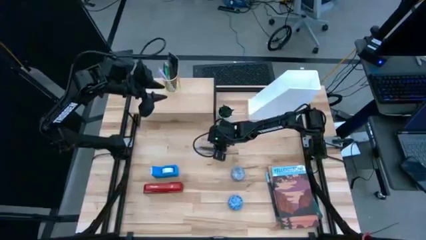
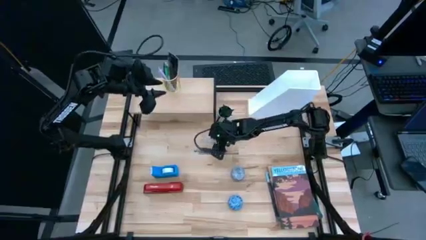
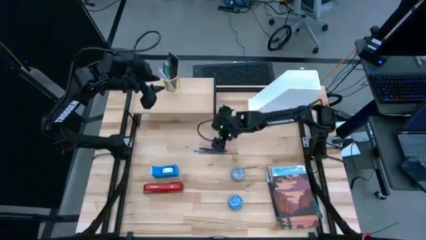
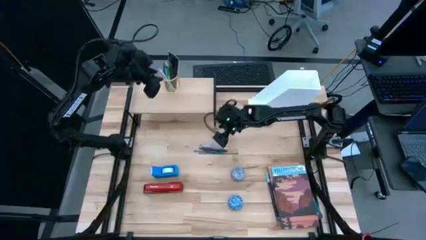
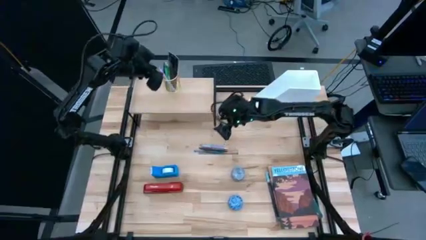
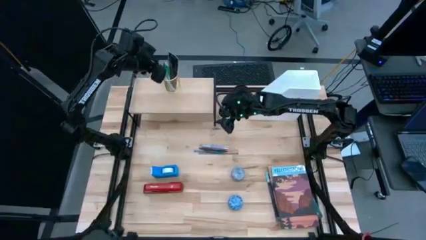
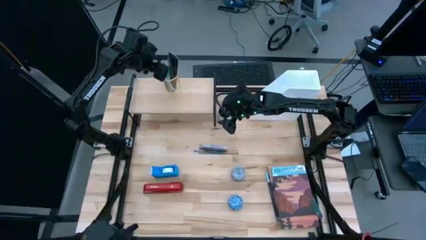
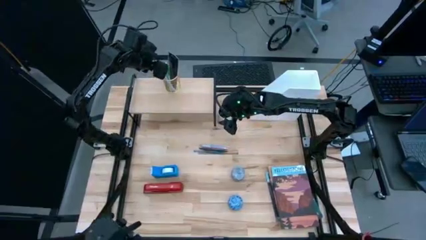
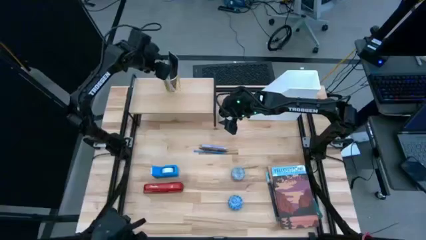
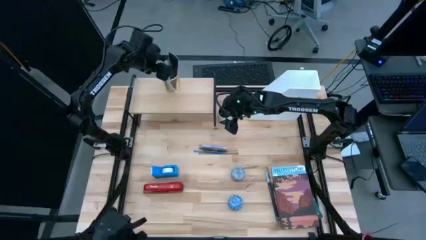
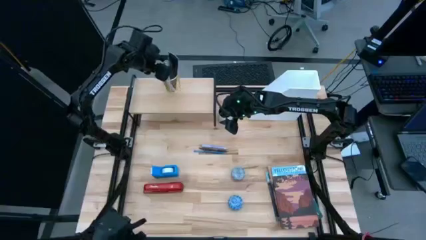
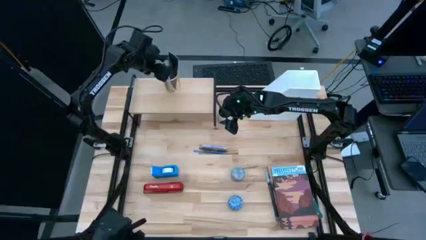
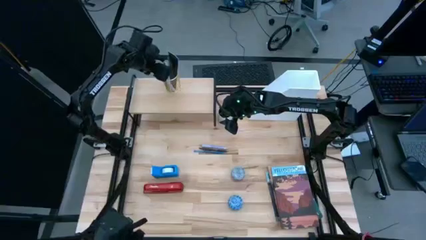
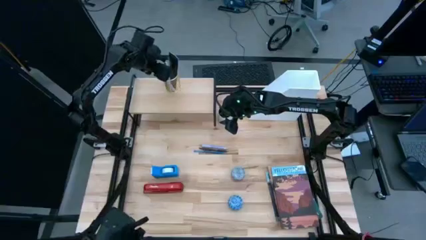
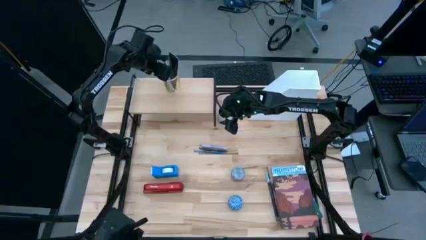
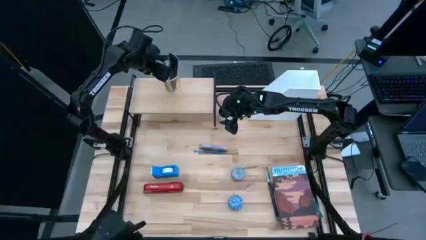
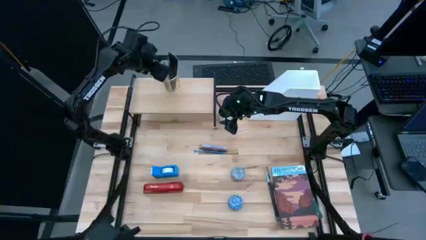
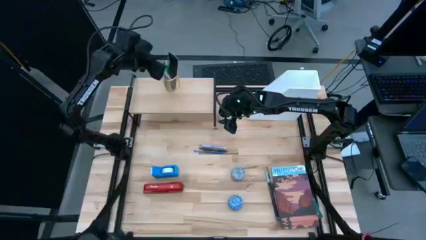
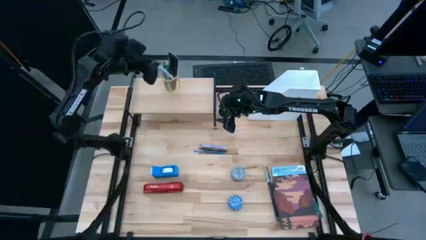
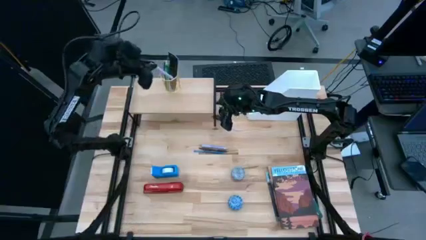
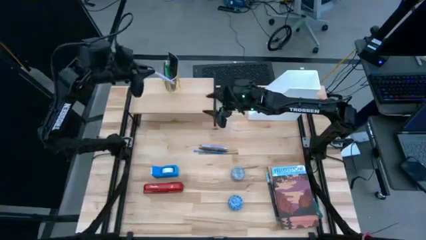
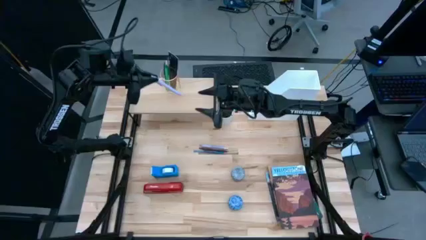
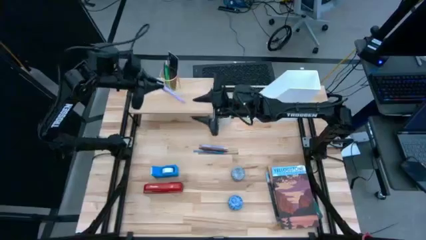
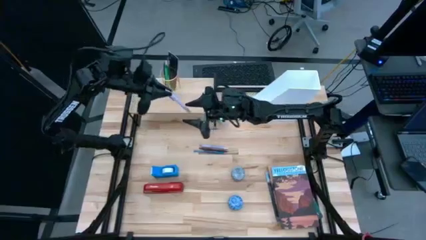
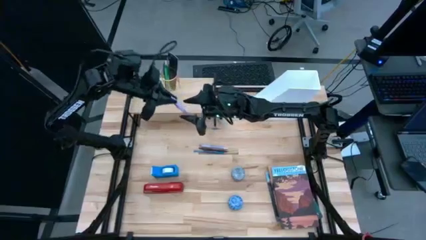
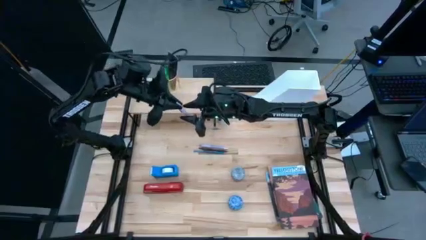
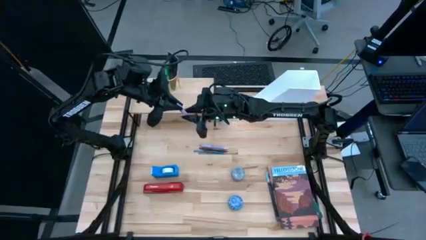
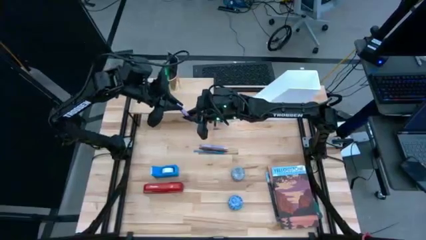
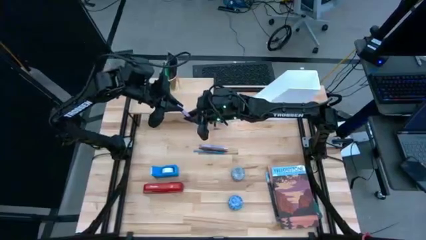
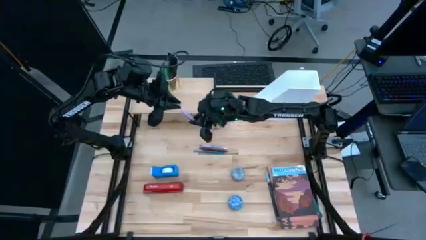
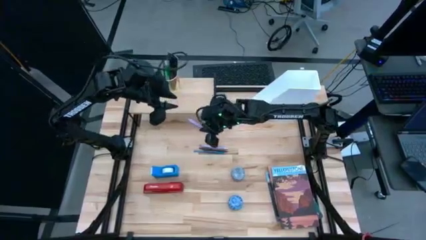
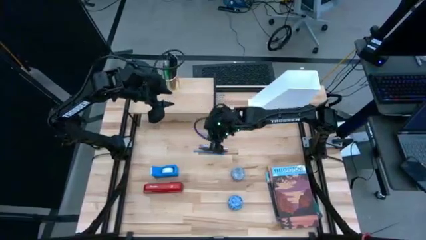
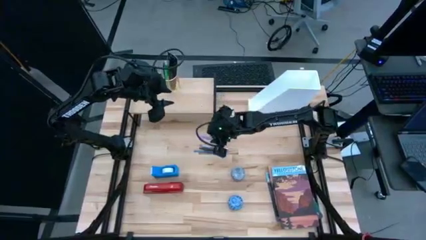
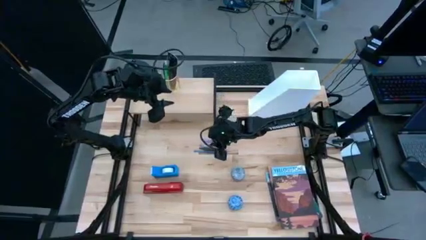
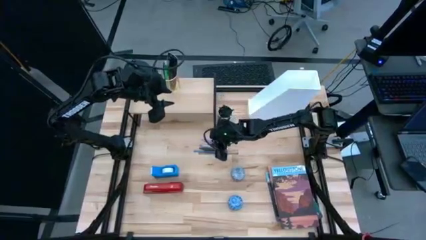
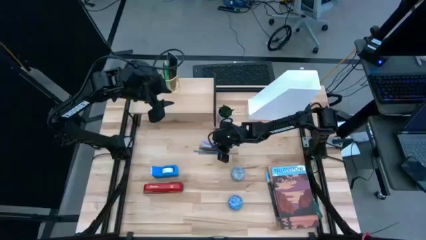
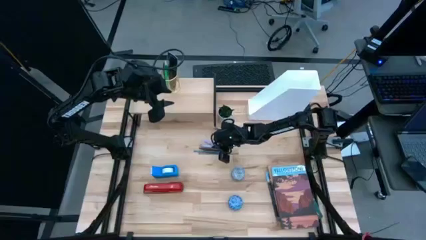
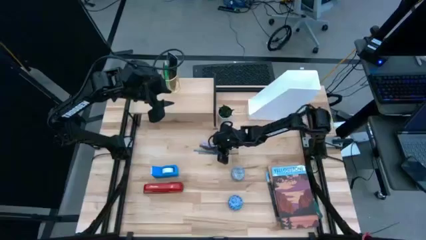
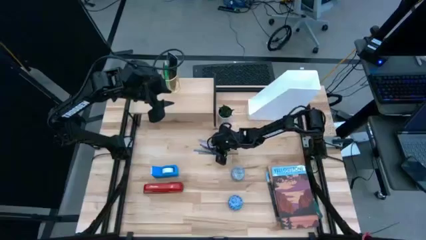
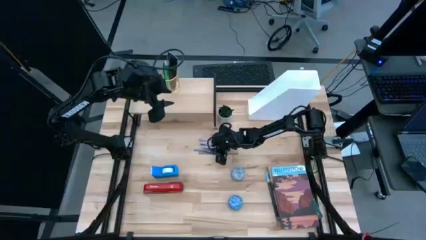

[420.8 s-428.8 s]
Task: Stock shelves
Remove the purple pen from the gold pen holder

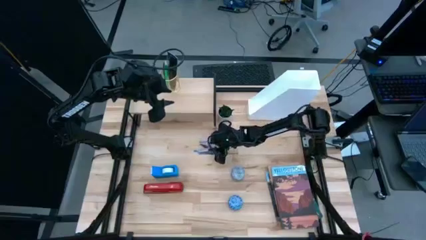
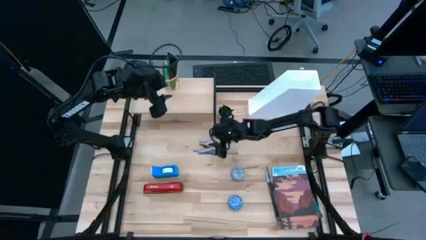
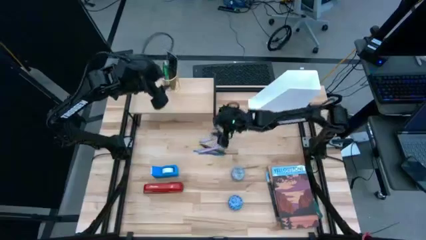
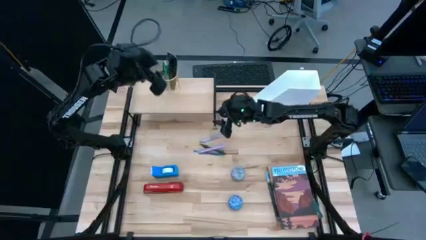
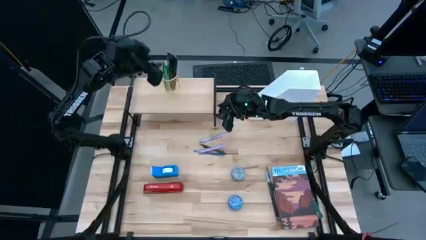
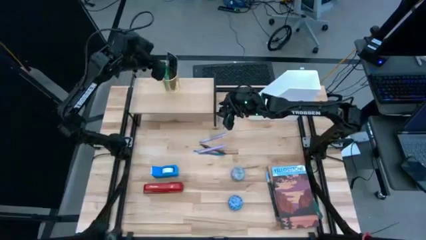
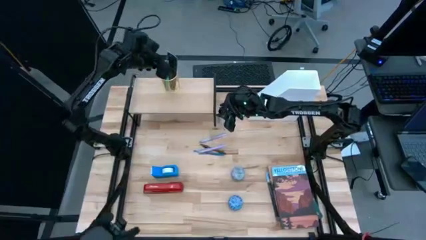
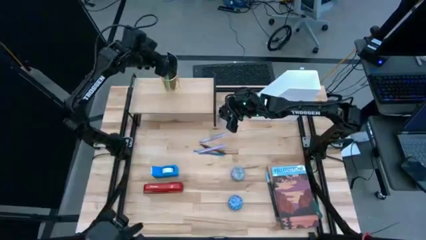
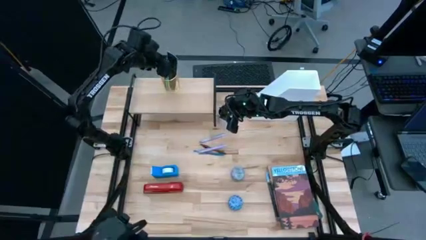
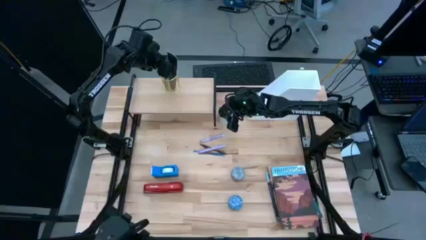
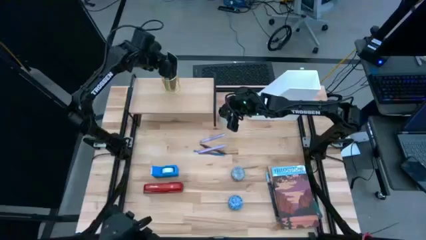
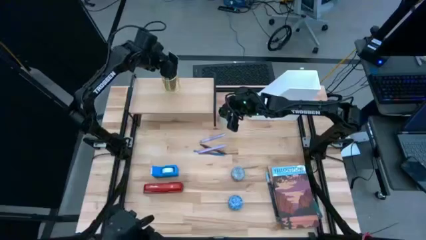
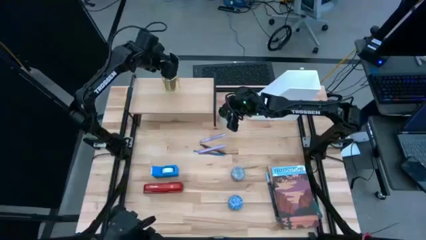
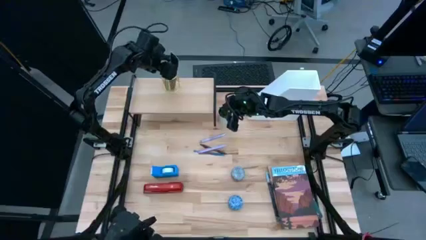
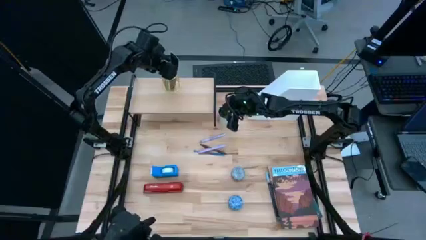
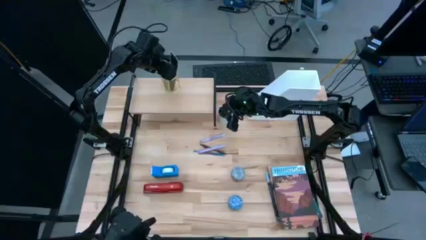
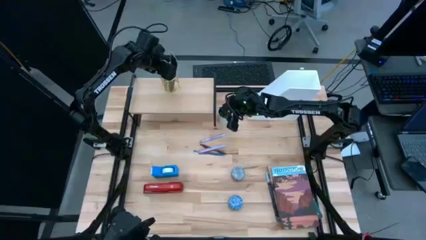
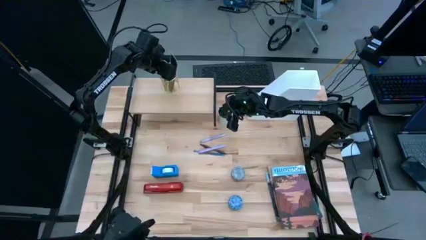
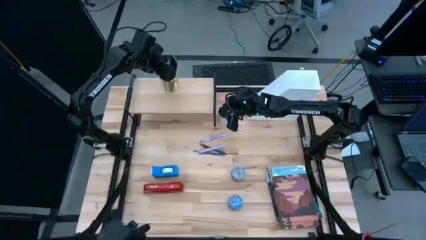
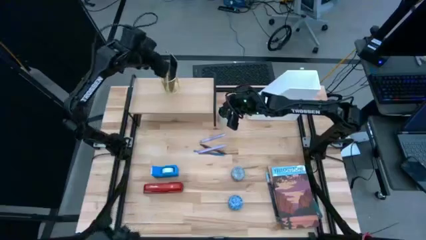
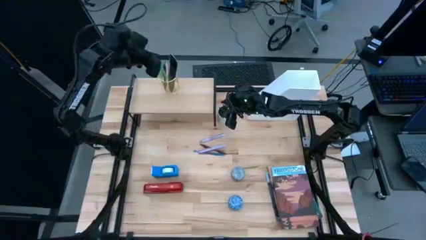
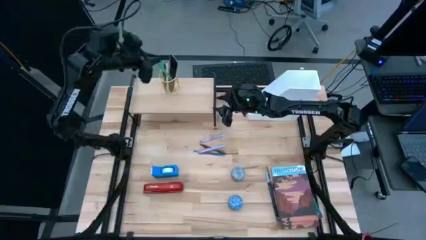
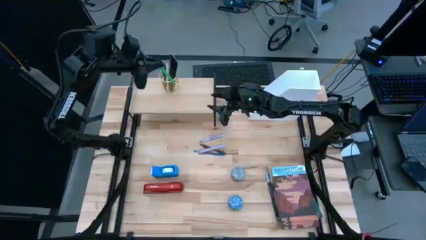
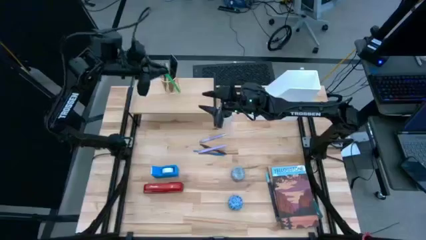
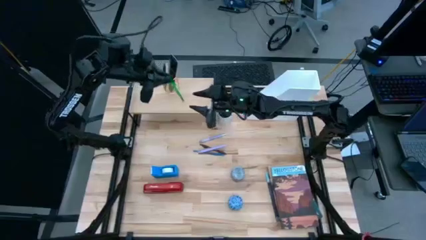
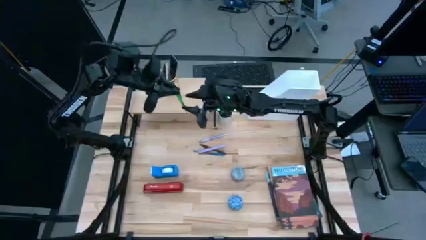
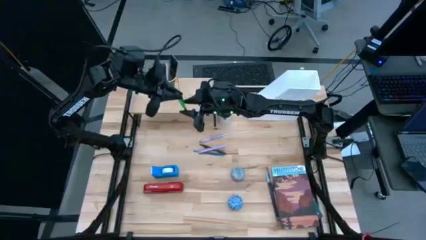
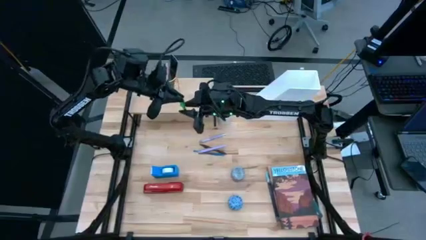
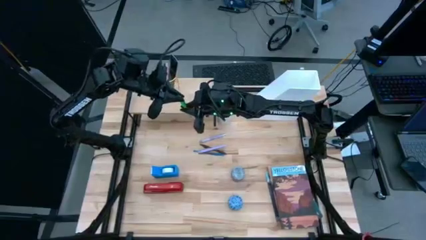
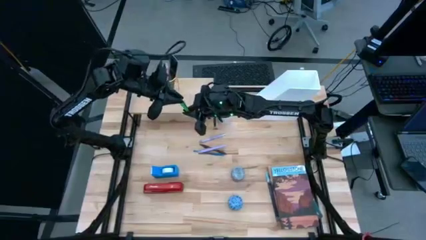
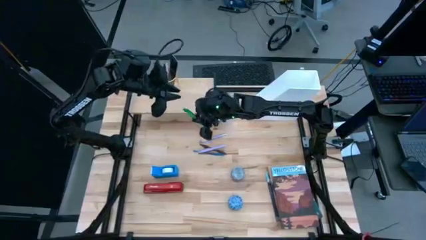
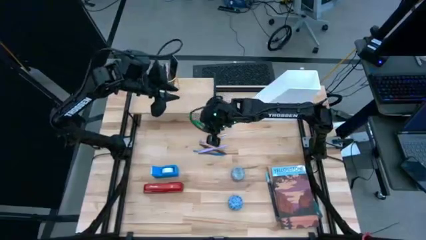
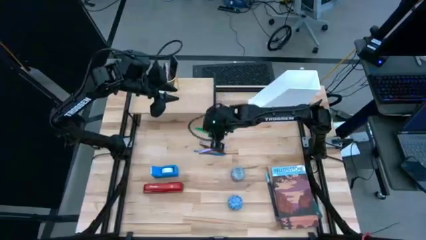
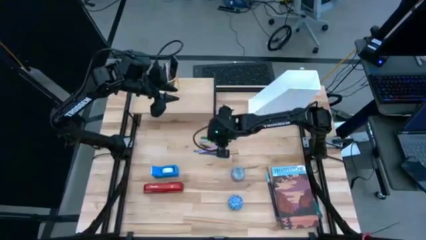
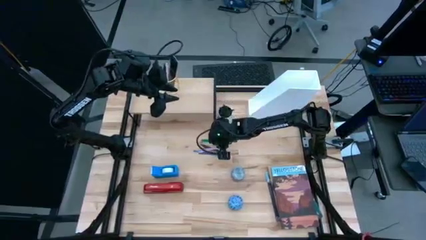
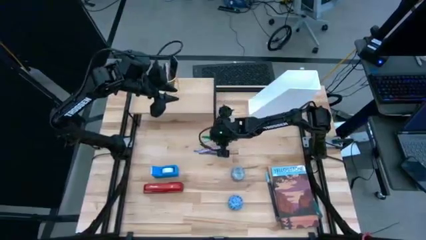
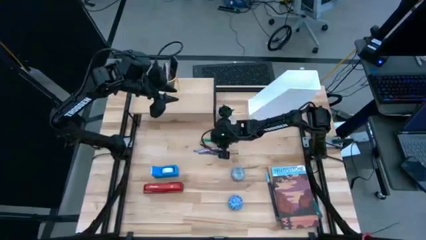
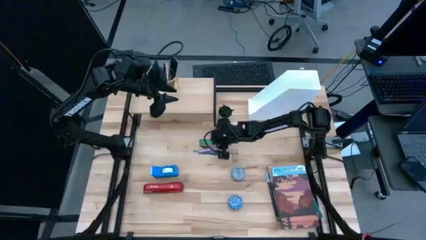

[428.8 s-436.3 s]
Remove the green pen from the gold pen holder

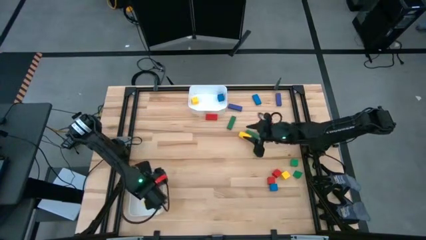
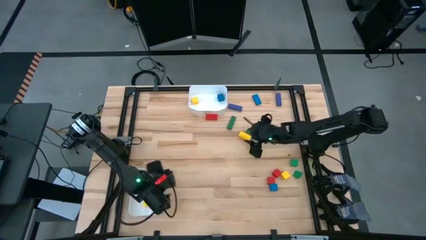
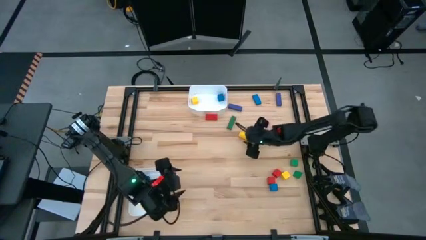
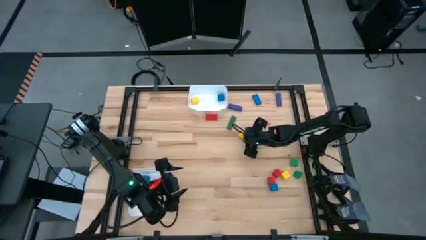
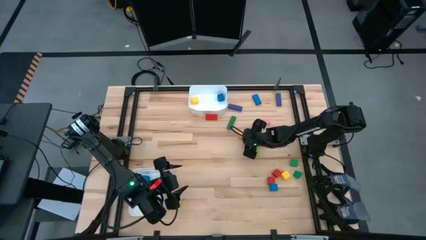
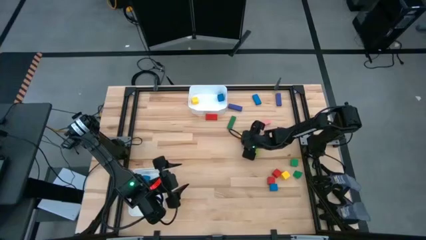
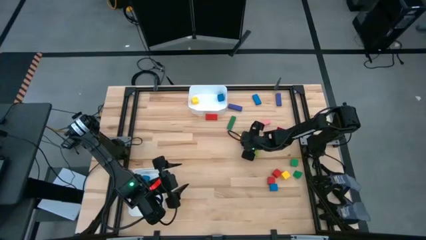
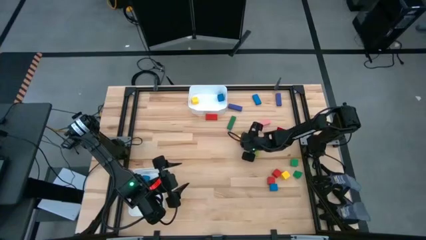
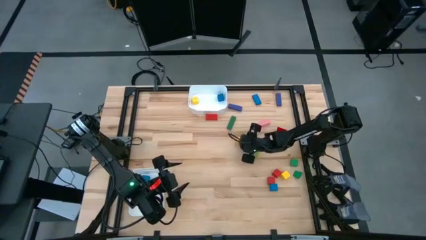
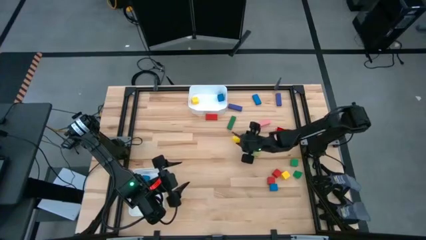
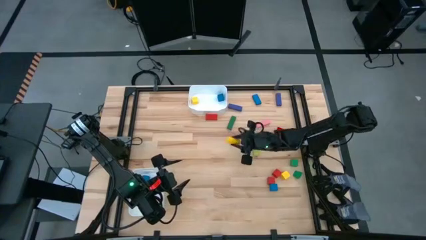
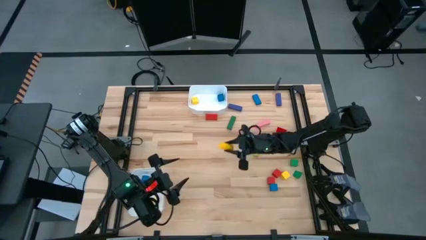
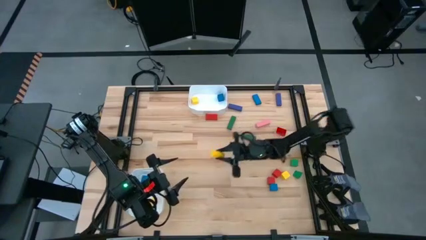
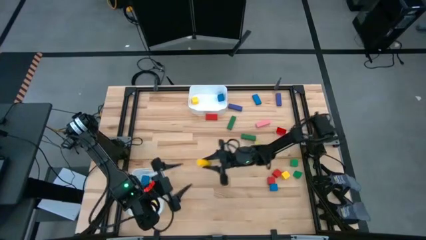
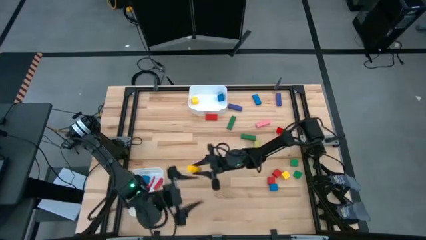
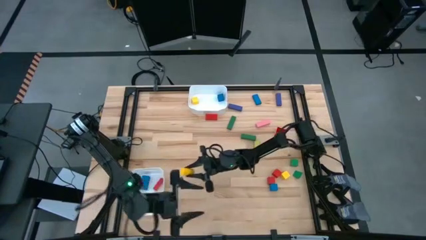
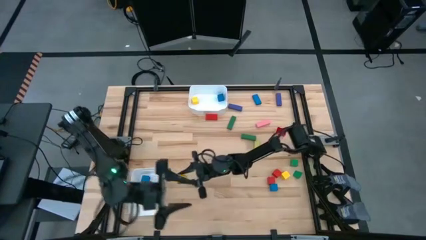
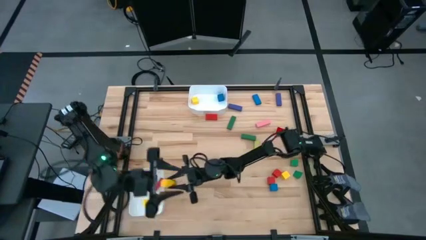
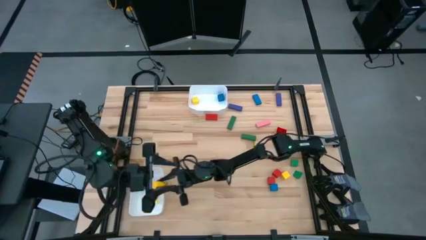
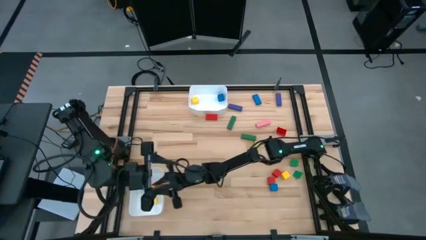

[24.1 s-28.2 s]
Task: Sort blocks by size
Put the yellow cylindrical block into the bottom white bin
